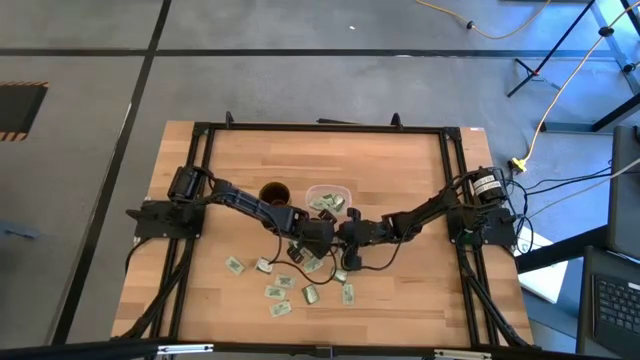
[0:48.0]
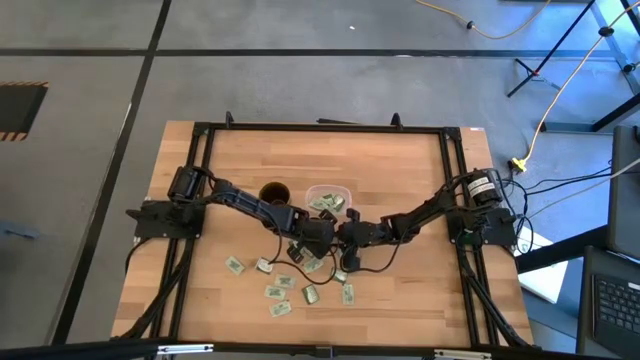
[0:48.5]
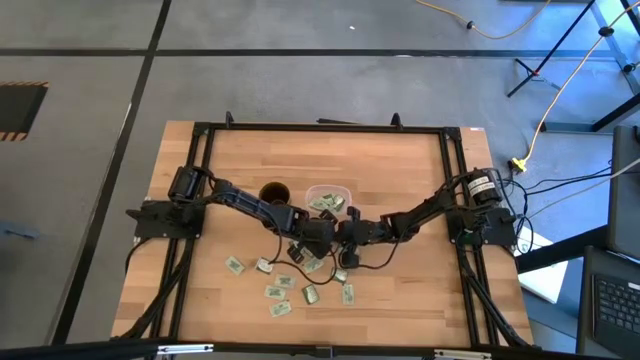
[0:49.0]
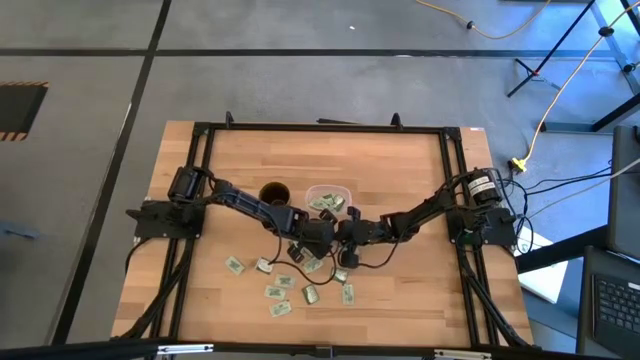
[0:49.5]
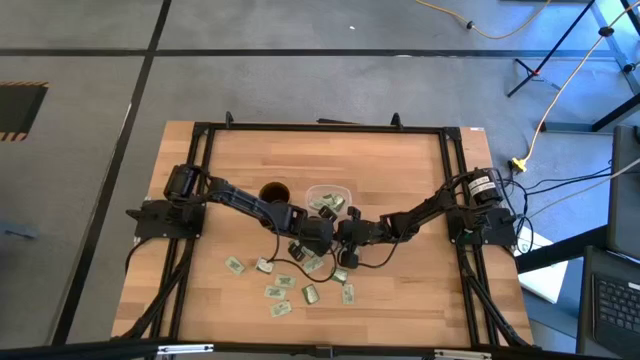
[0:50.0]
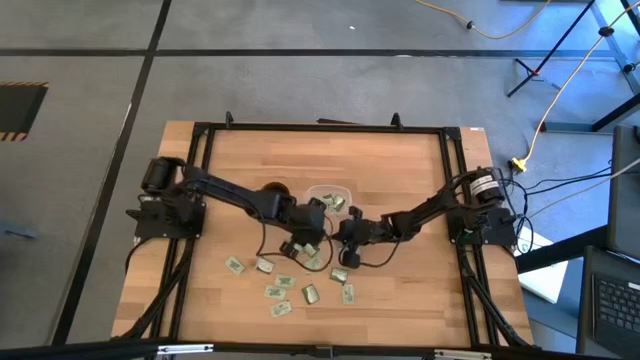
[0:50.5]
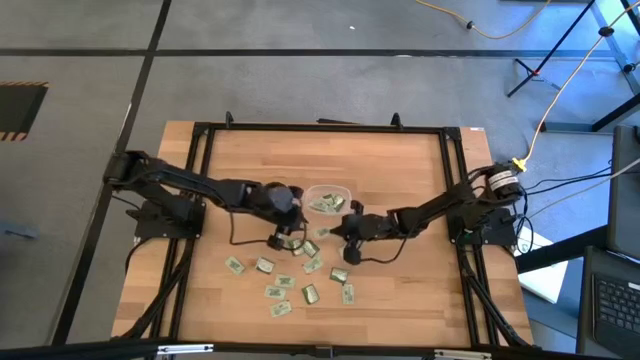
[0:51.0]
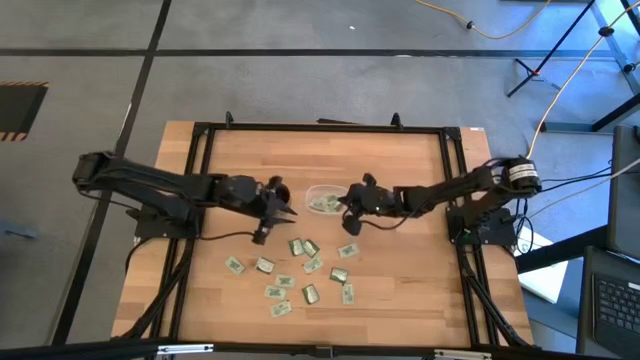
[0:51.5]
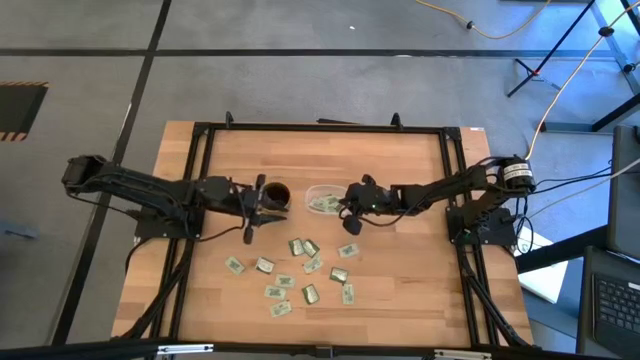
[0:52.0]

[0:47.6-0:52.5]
Task: Pick and place items into bin
Put the light green stevia pack into the transparent bin

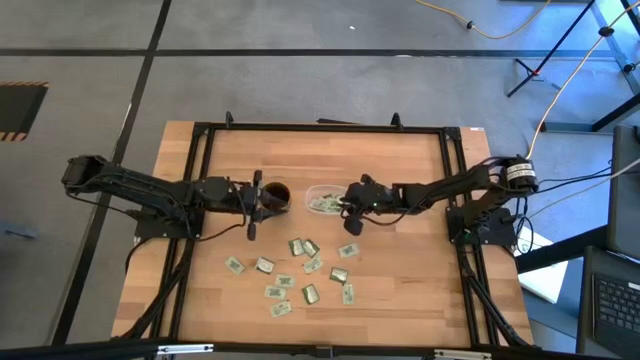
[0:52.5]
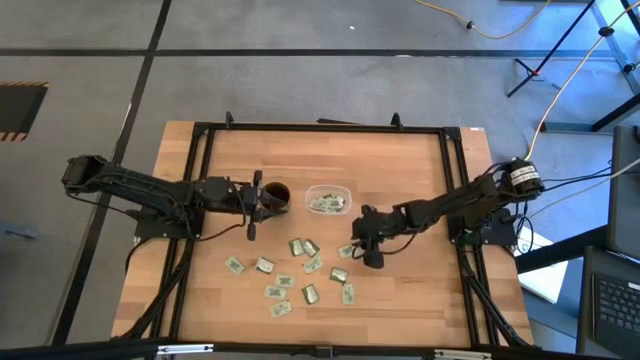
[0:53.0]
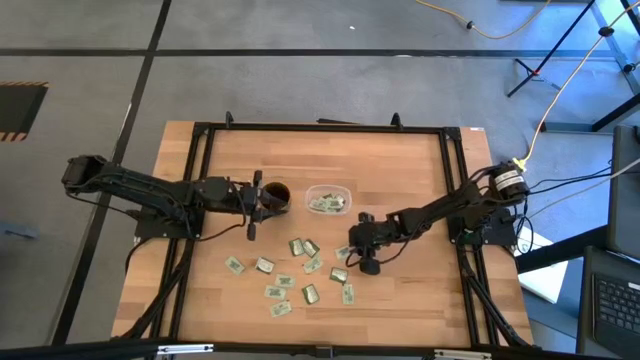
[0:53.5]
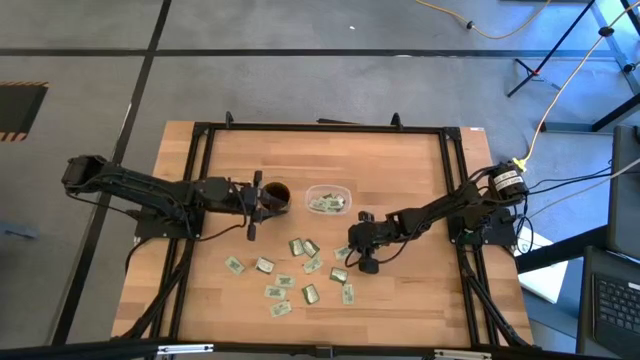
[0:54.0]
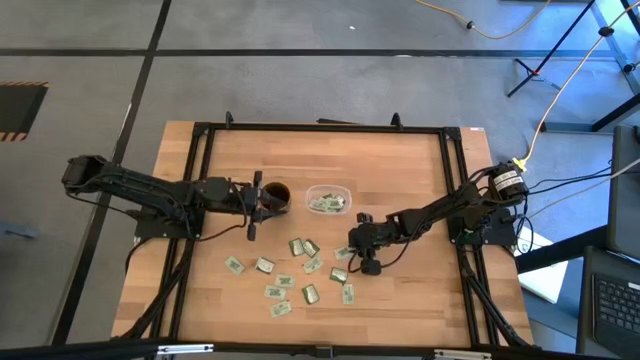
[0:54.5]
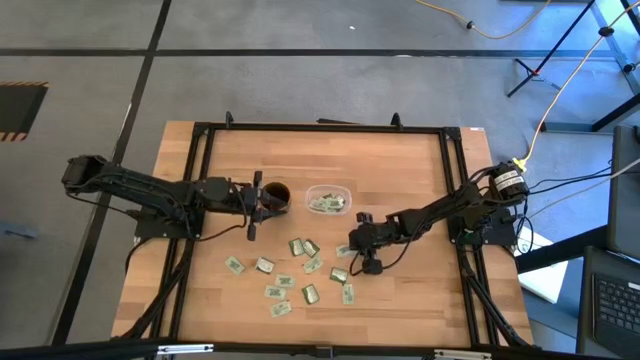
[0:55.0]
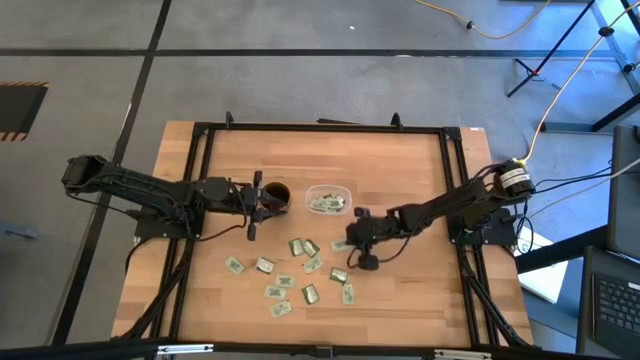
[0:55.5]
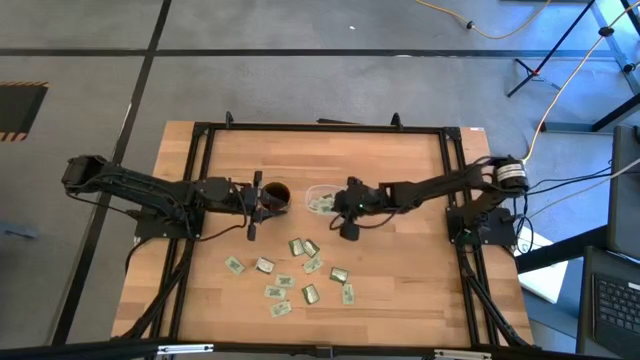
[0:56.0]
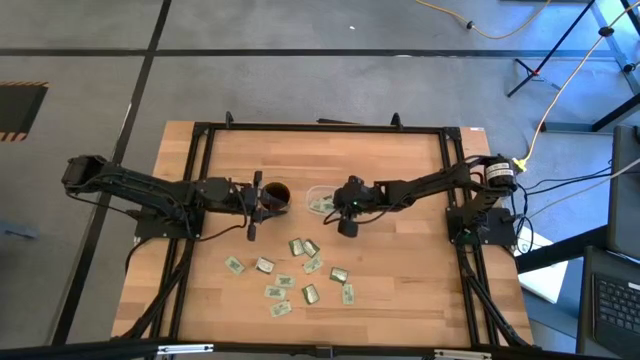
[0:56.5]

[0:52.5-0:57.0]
Put the light green stevia pack into the transparent bin

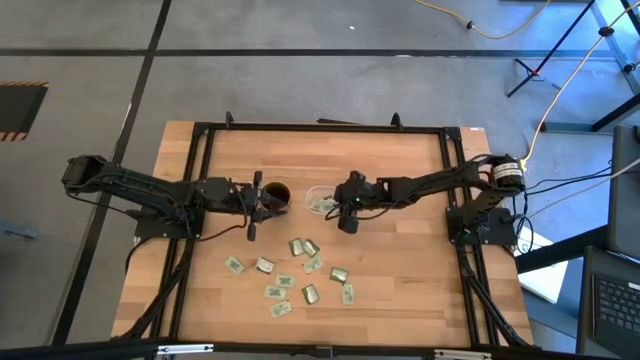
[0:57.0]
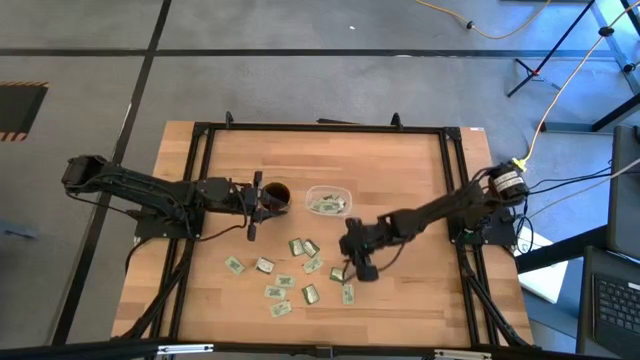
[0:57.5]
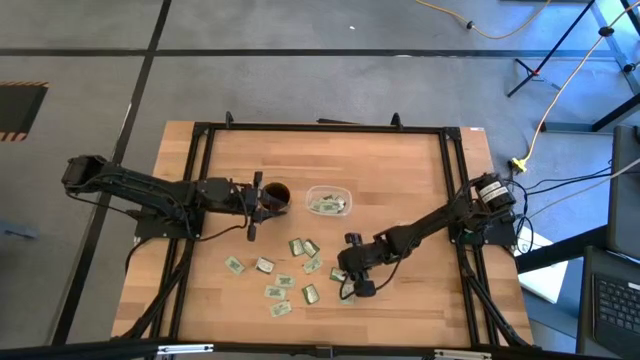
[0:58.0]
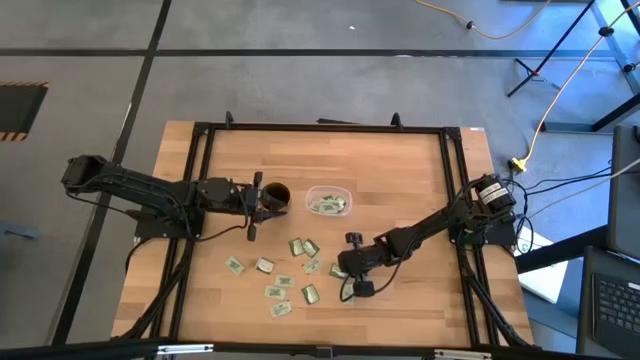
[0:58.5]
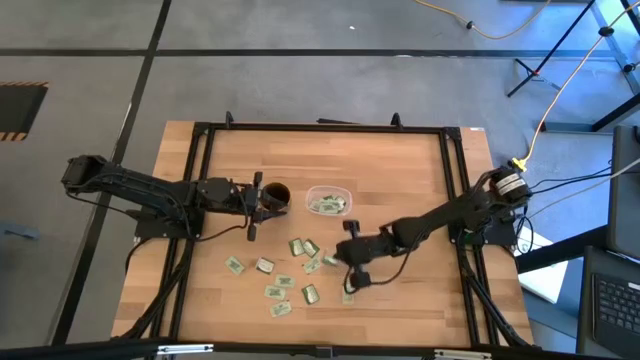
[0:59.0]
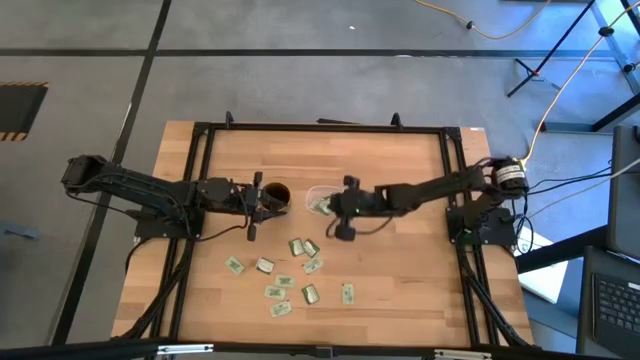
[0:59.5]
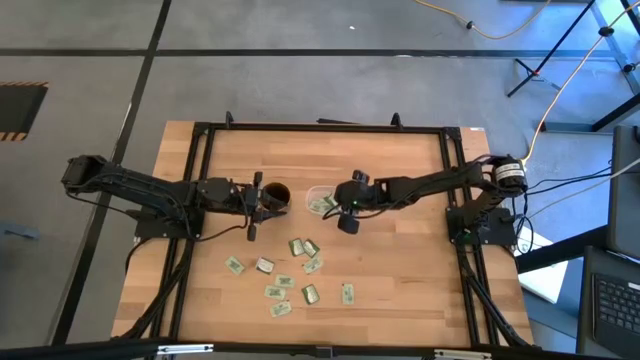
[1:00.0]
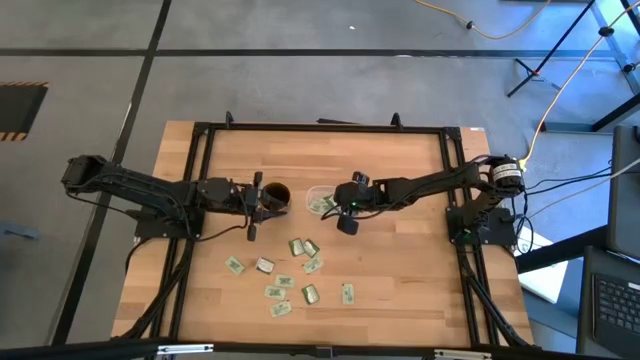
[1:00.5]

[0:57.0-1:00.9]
Put the green truvia pack into the transparent bin

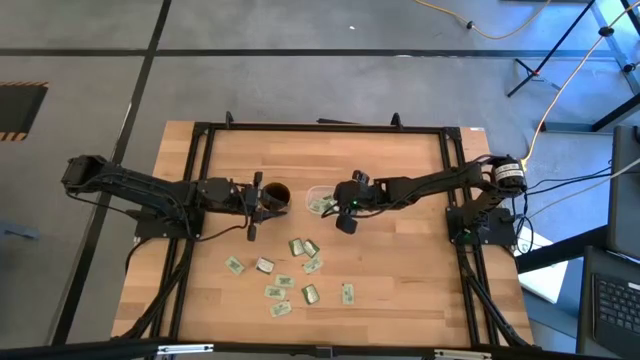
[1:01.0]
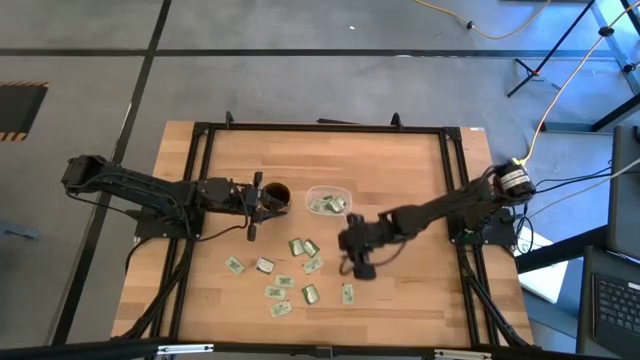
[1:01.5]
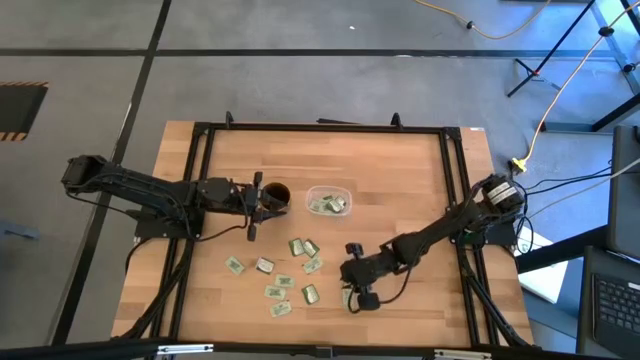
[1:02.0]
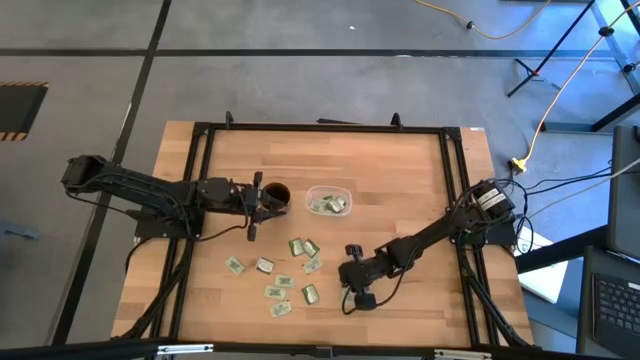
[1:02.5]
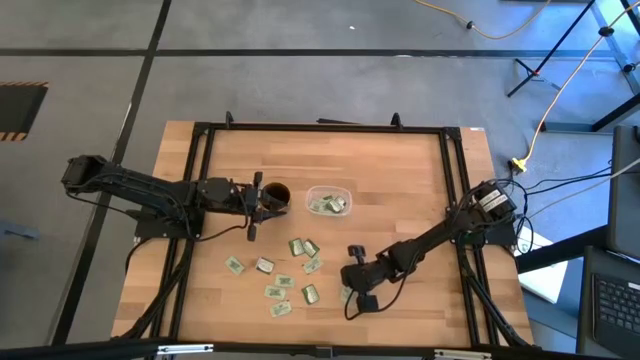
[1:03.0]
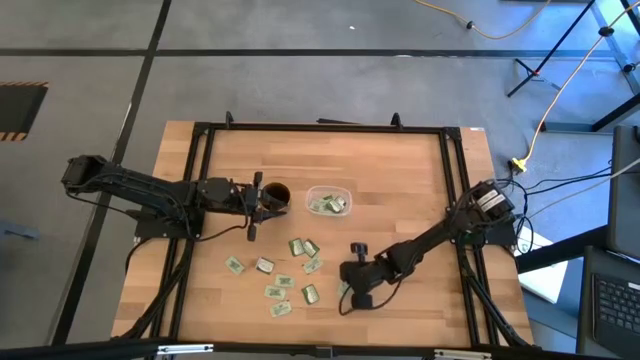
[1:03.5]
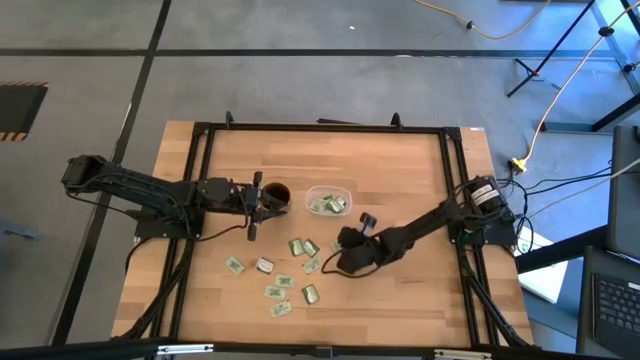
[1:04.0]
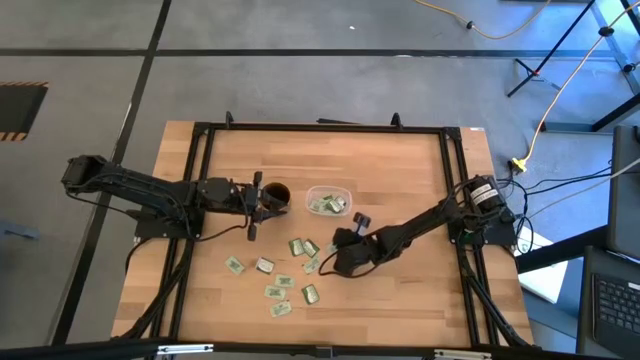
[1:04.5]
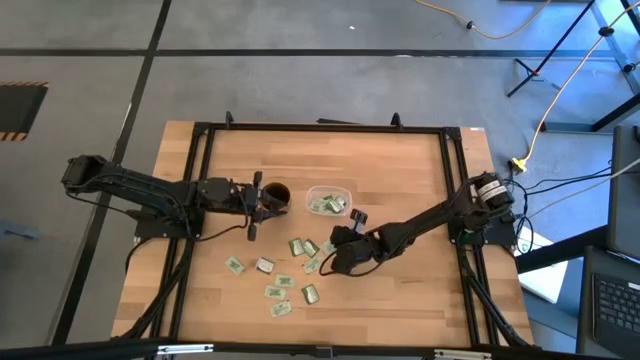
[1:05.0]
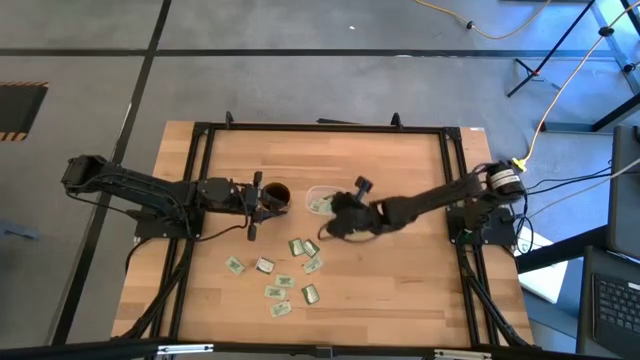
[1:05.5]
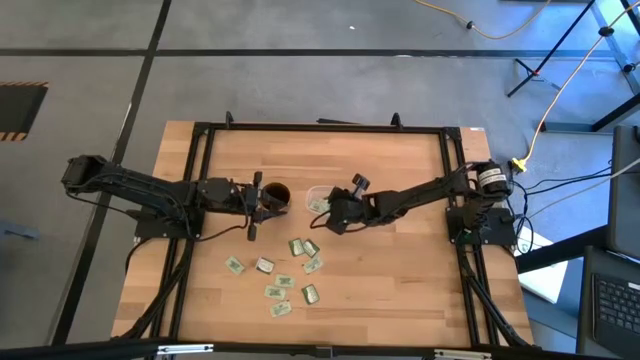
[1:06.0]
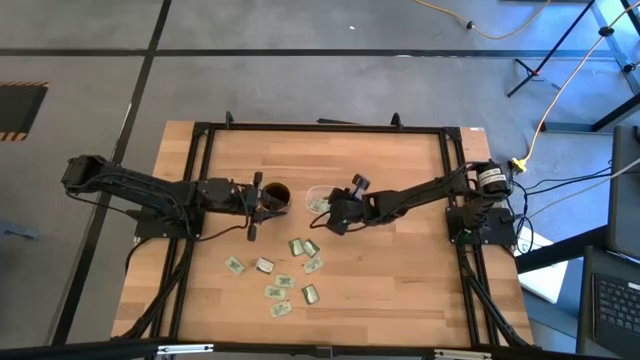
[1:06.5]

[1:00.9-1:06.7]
Put the light green stevia pack into the transparent bin

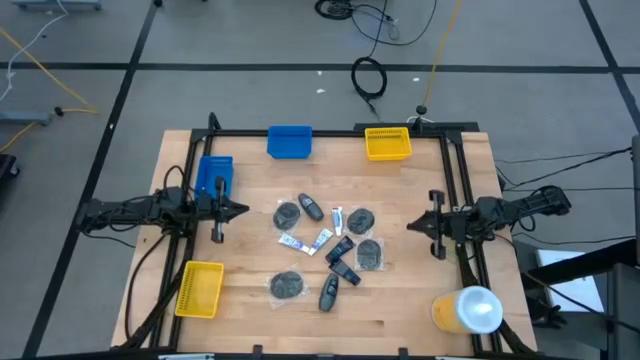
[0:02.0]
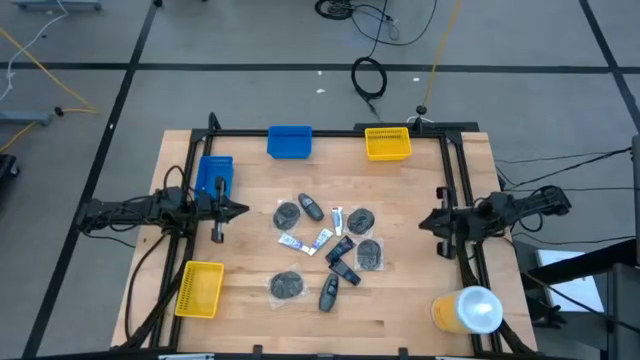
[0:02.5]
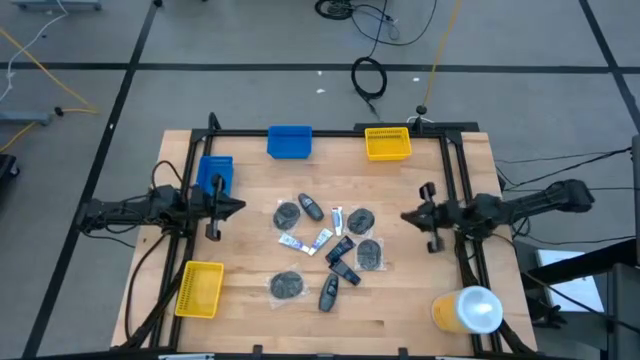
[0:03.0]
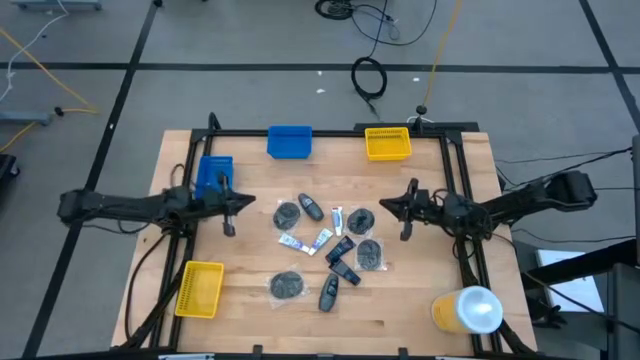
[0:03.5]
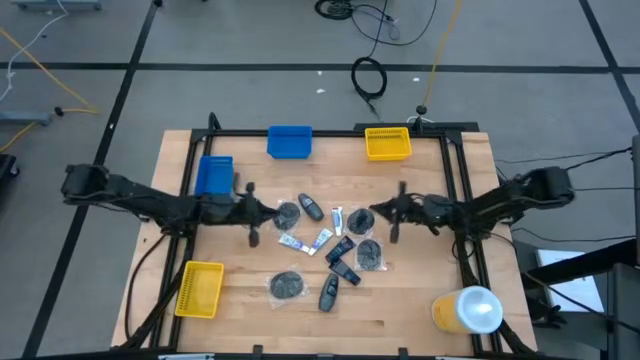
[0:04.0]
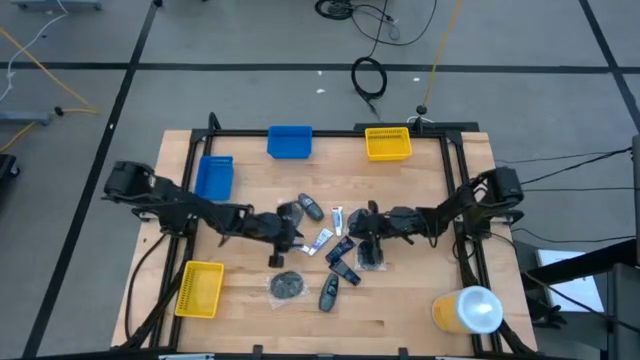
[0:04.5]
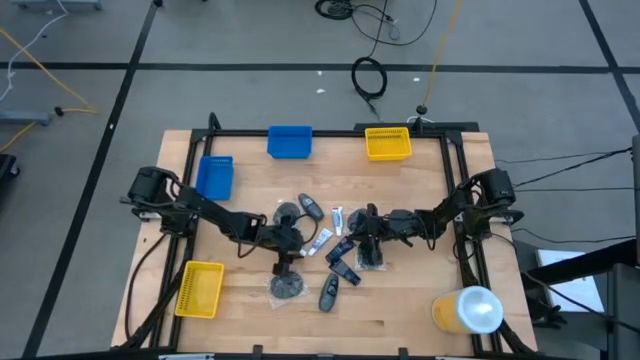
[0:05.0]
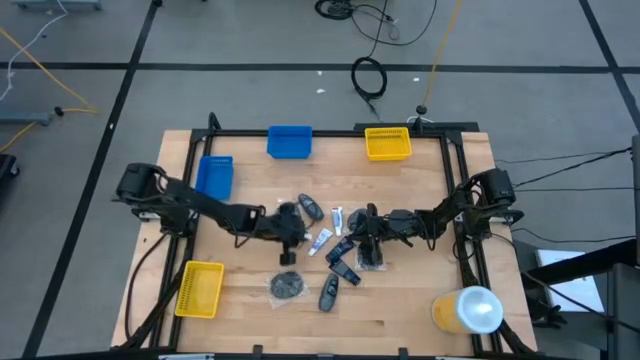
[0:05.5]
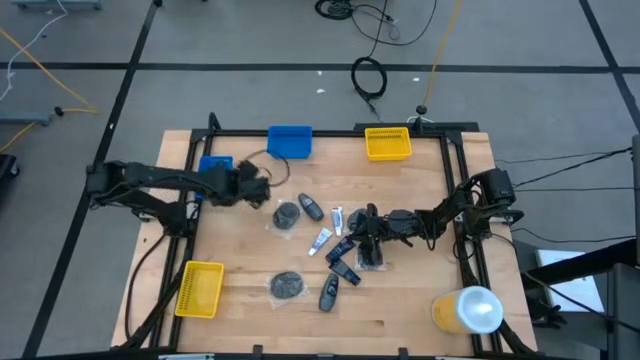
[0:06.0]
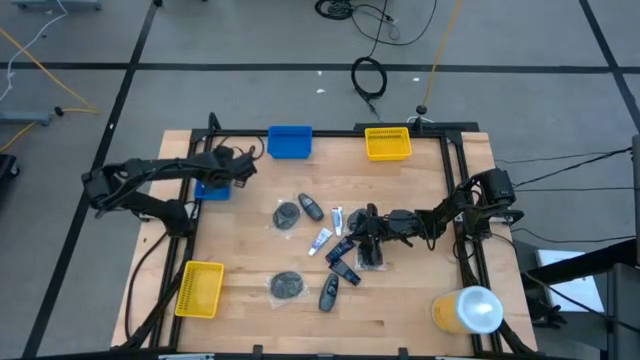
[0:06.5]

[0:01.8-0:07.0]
Task: Pick & Place Travel size toiletries
Put the white toothpaste into the left blue bin
